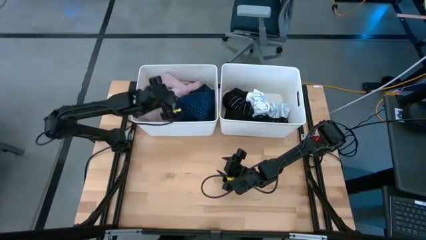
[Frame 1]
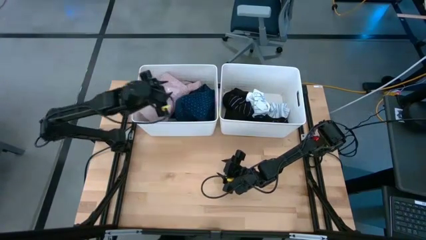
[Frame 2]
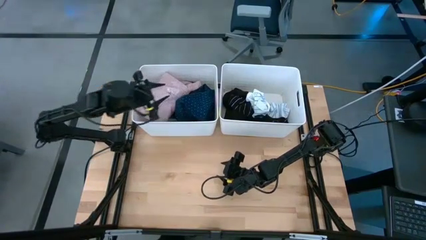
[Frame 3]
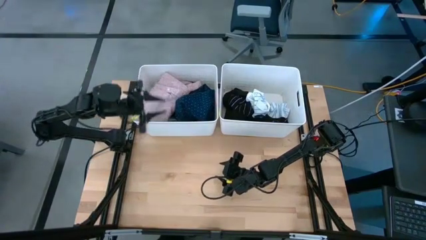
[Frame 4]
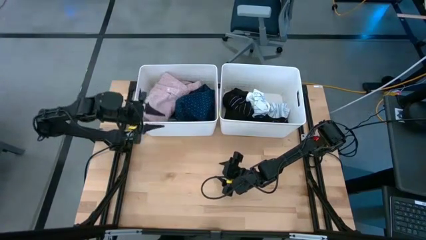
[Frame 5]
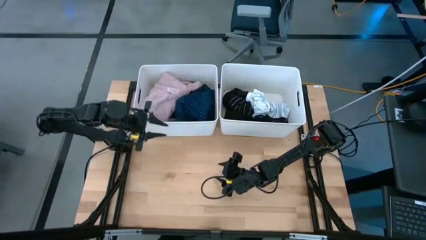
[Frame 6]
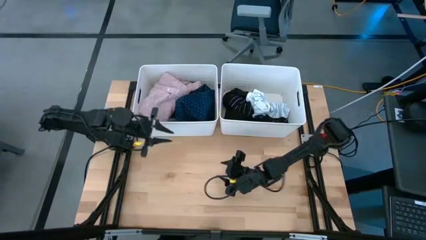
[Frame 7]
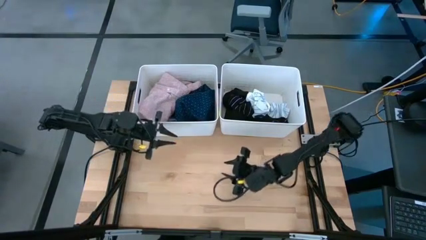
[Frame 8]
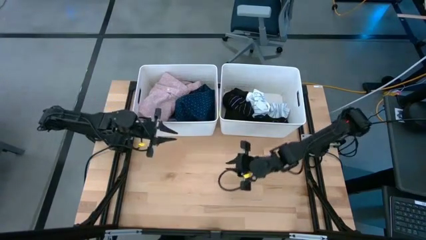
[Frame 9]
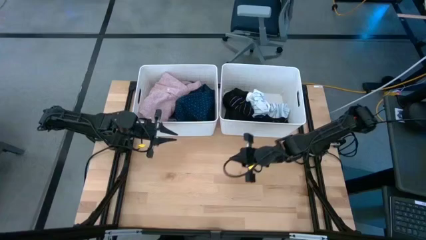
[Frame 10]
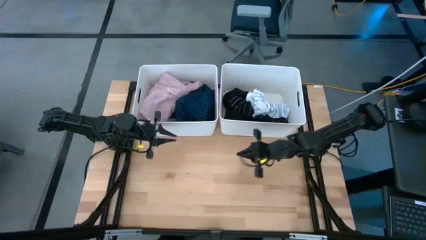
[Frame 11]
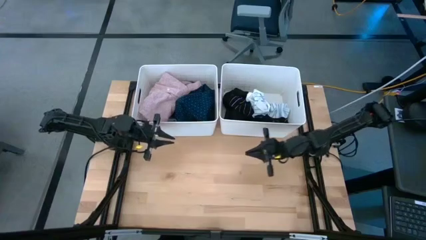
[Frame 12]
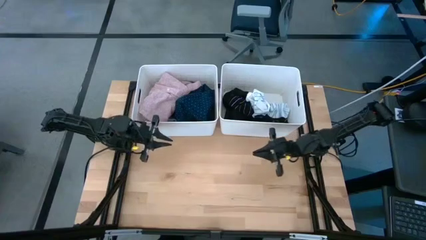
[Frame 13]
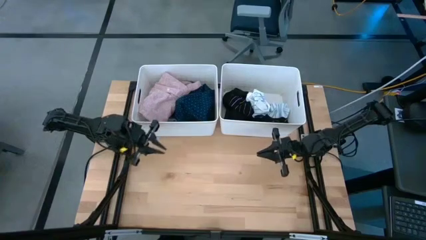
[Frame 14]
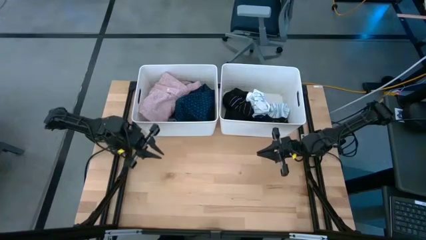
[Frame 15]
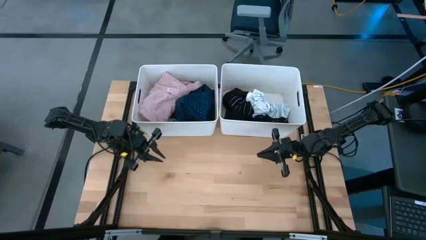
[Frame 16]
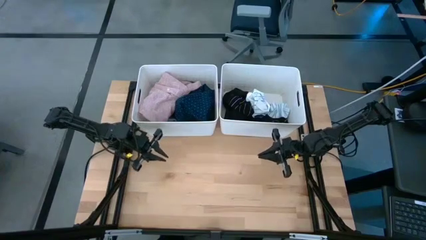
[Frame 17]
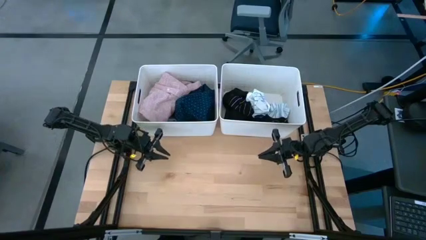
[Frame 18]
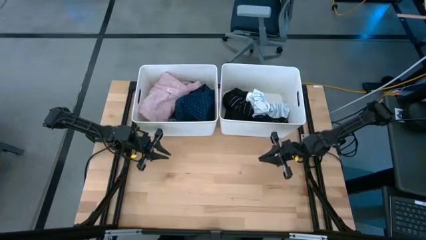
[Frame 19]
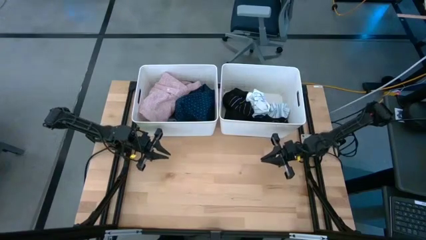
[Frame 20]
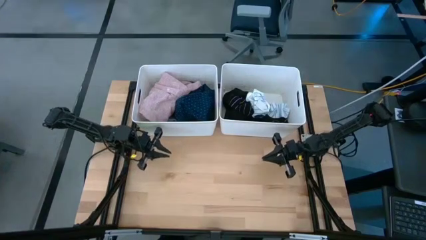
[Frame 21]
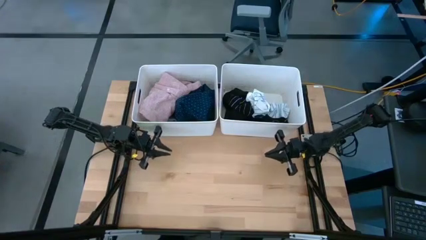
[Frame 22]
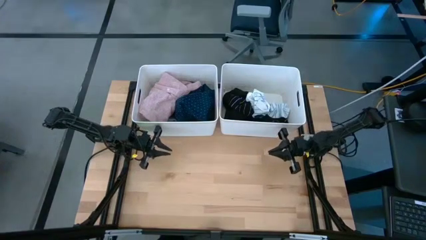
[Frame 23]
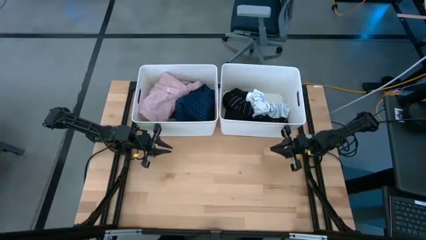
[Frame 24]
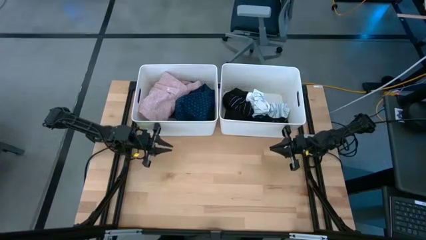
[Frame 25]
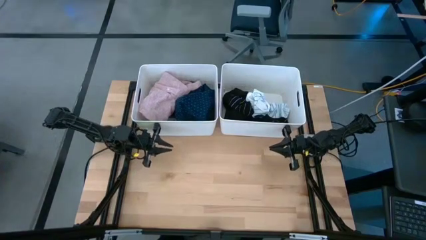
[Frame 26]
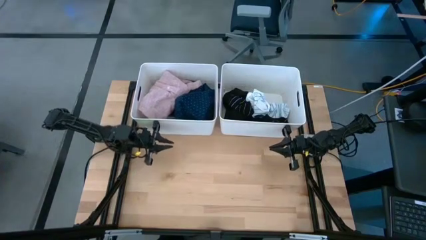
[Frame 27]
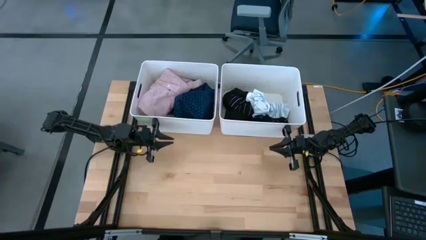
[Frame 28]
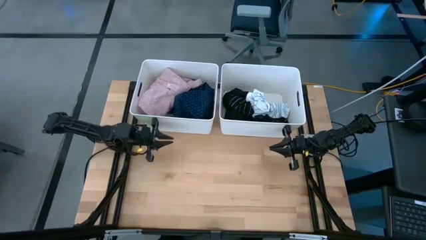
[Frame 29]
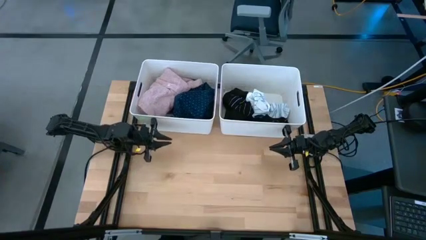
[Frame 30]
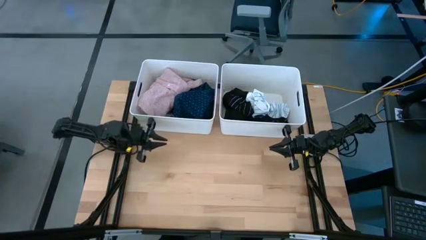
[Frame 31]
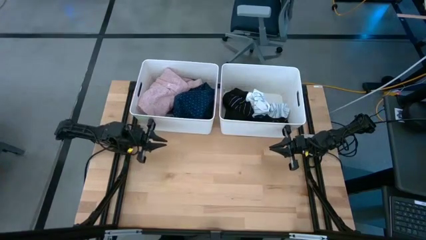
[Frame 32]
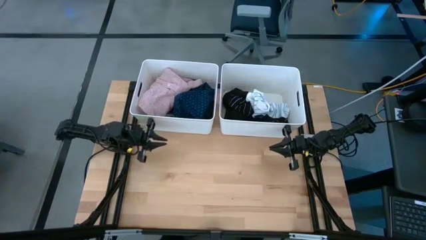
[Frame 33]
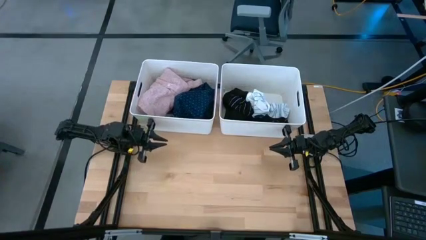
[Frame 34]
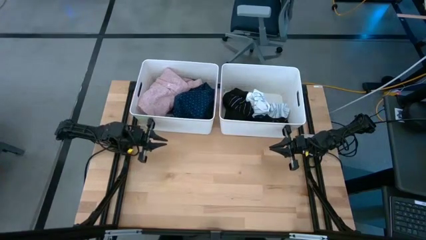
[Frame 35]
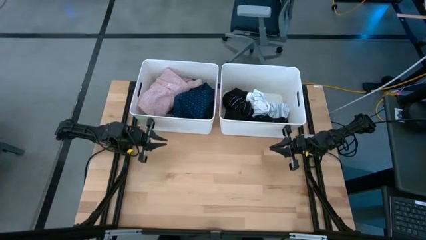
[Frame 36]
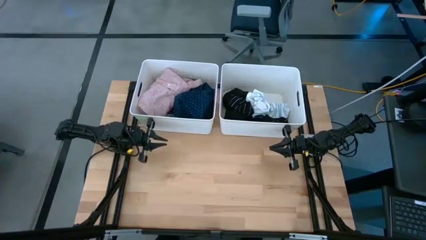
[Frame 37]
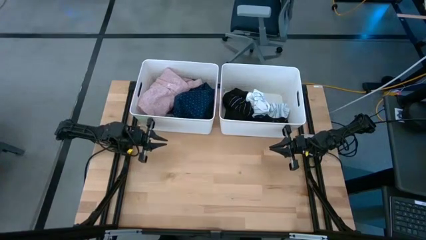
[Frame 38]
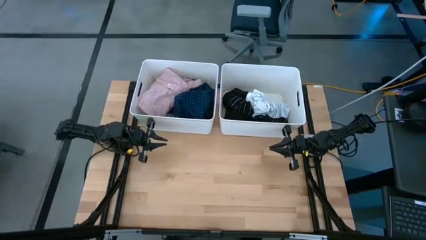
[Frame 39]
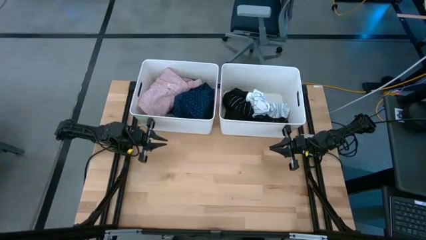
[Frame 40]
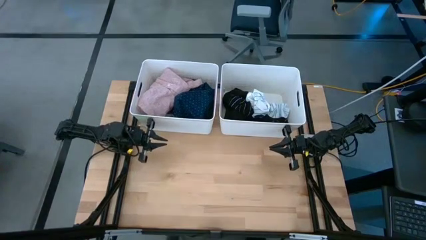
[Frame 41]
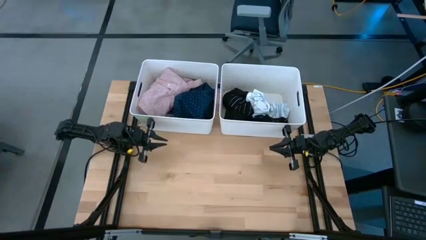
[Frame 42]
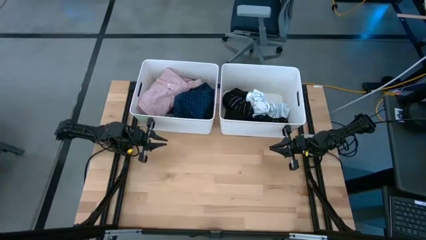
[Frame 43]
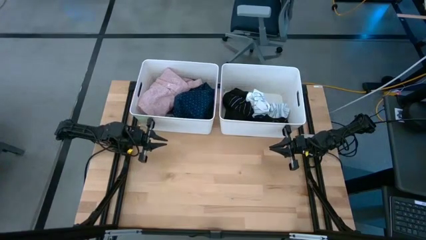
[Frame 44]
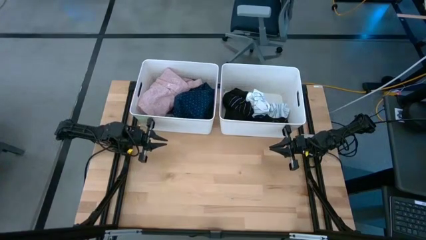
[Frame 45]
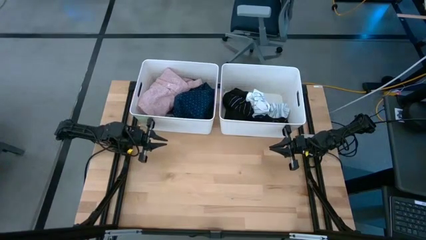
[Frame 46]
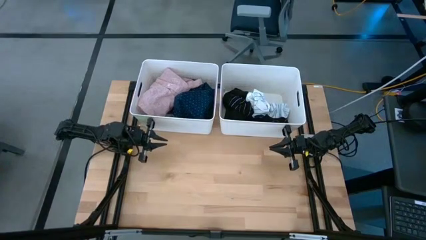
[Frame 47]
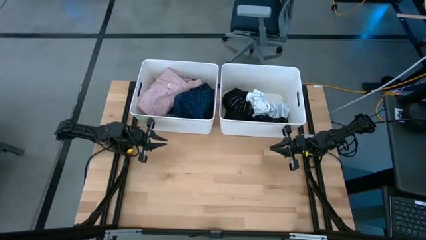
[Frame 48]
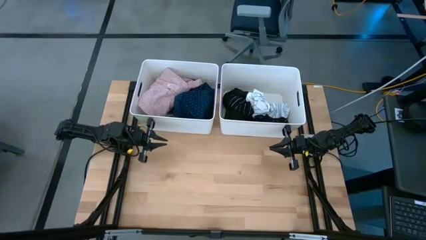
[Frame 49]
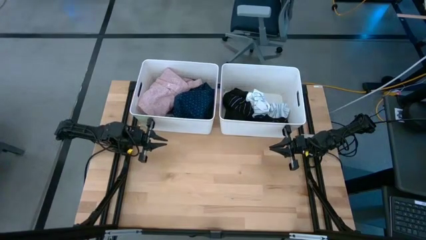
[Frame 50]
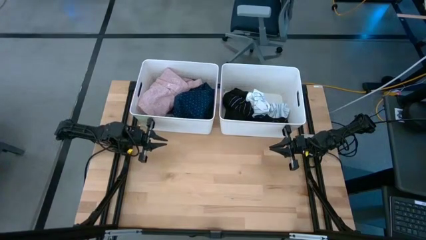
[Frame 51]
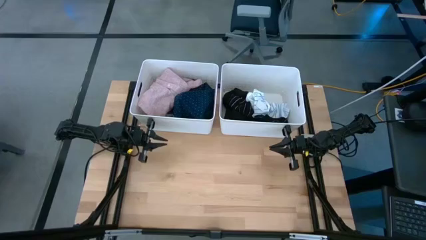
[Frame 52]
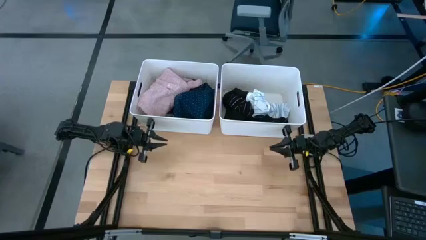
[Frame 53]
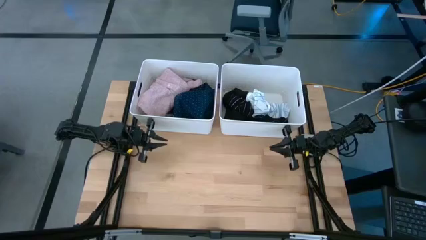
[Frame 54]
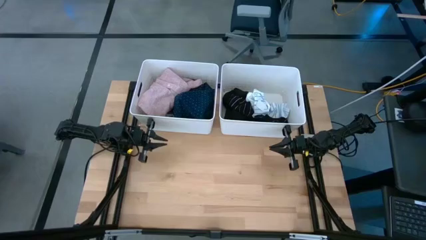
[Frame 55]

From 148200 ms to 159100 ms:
Task: Sort clothes
Return to home position
